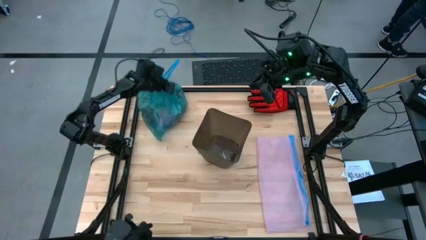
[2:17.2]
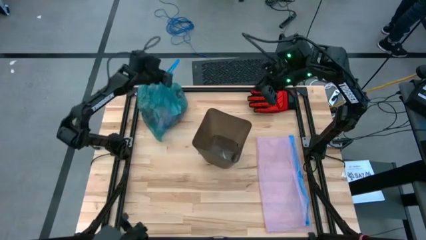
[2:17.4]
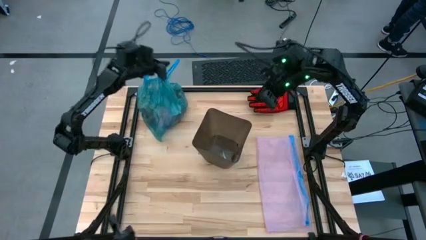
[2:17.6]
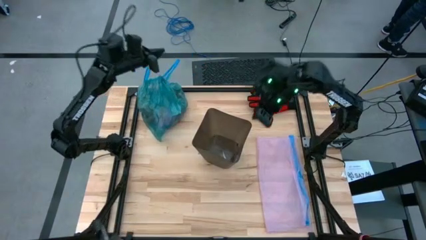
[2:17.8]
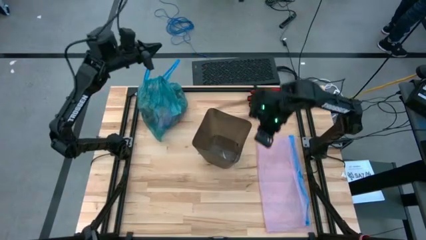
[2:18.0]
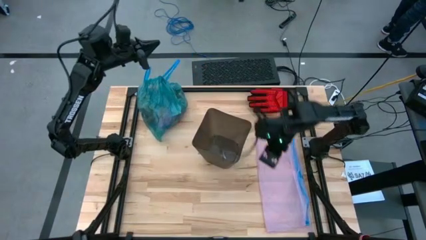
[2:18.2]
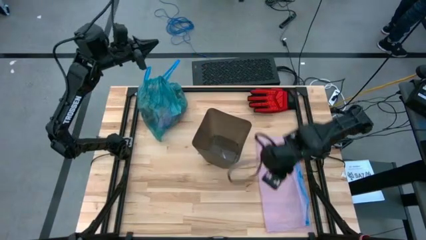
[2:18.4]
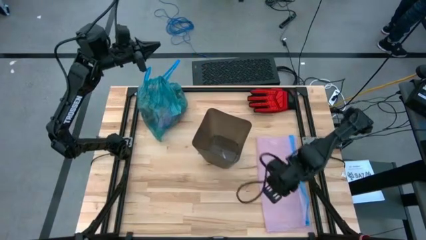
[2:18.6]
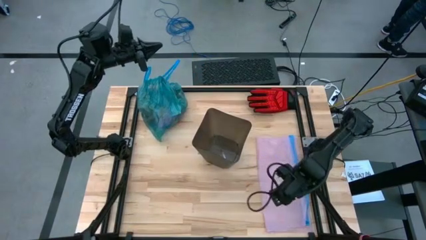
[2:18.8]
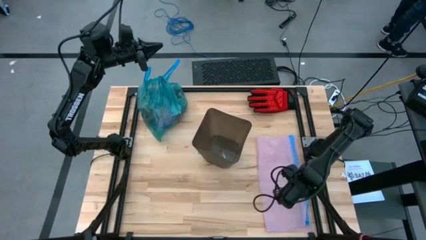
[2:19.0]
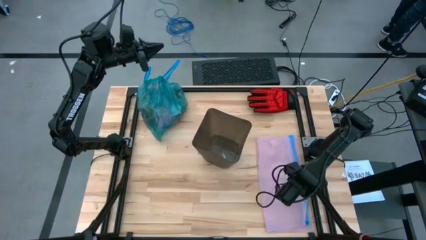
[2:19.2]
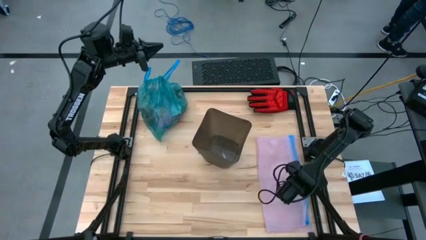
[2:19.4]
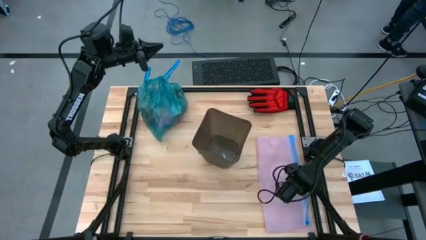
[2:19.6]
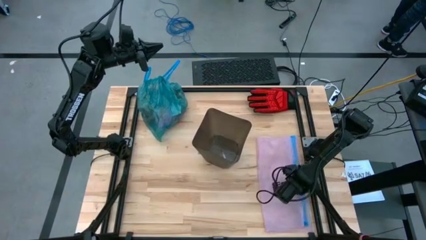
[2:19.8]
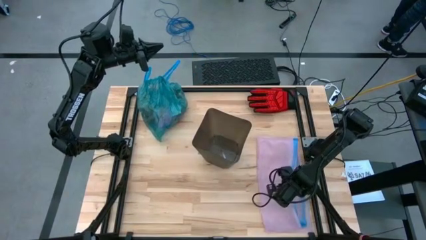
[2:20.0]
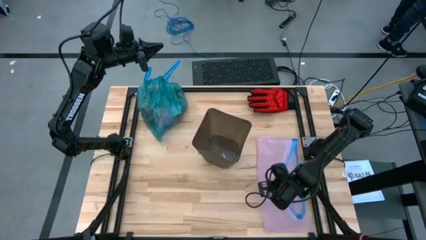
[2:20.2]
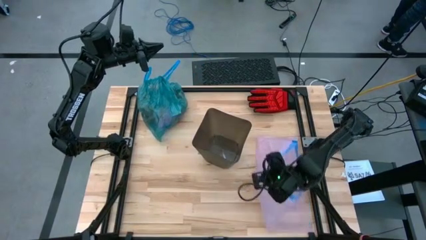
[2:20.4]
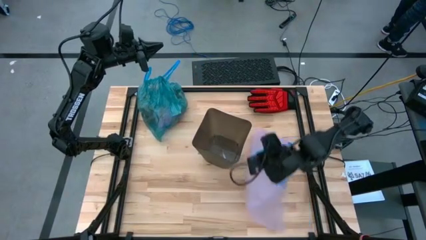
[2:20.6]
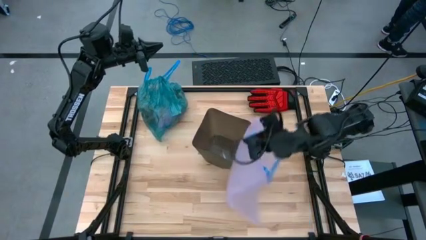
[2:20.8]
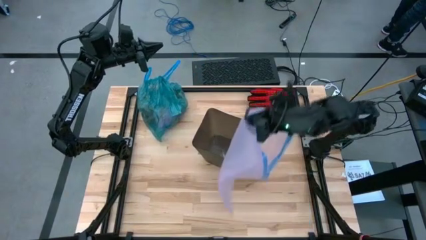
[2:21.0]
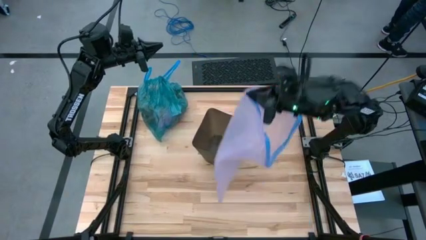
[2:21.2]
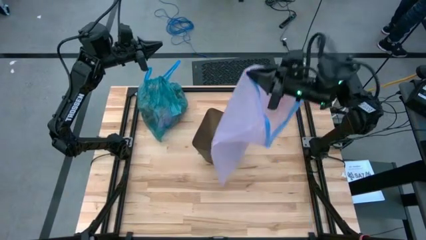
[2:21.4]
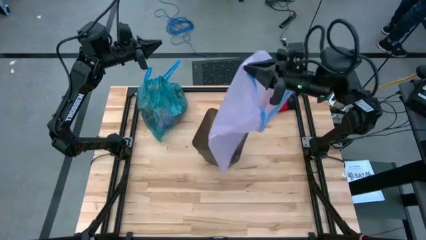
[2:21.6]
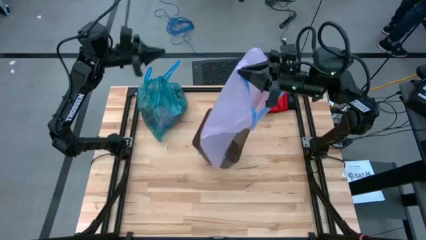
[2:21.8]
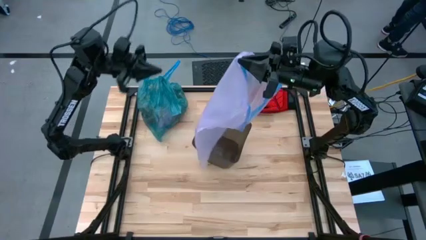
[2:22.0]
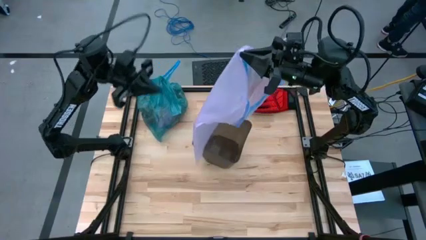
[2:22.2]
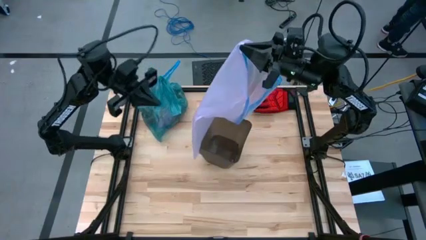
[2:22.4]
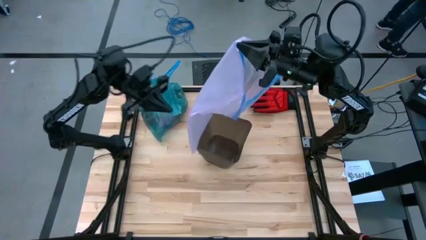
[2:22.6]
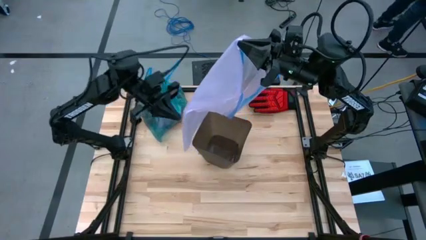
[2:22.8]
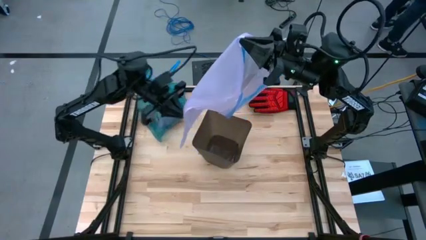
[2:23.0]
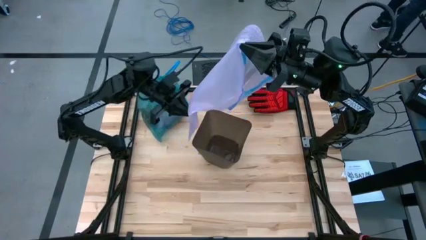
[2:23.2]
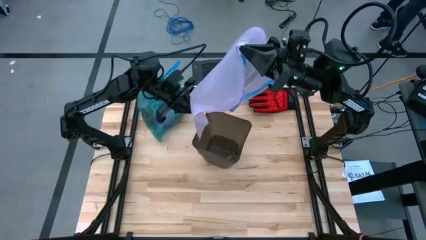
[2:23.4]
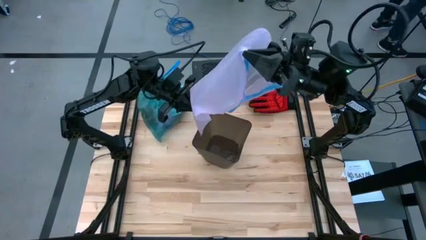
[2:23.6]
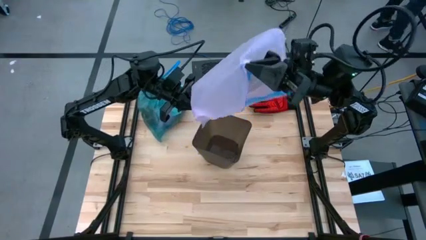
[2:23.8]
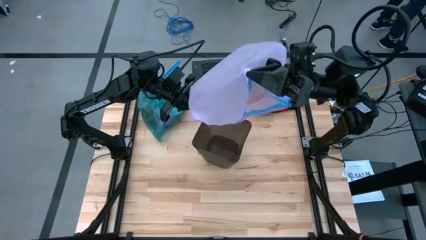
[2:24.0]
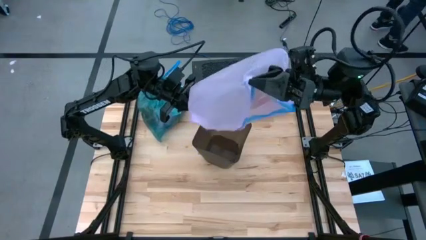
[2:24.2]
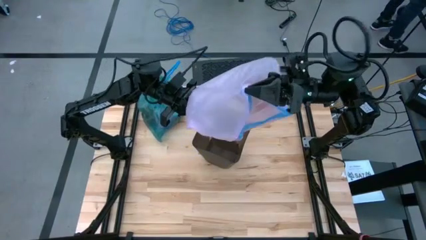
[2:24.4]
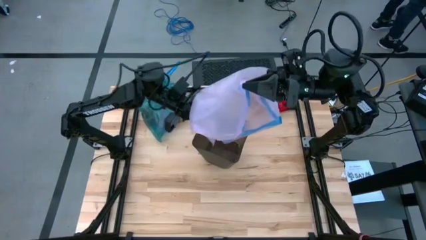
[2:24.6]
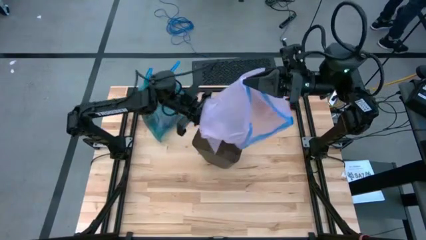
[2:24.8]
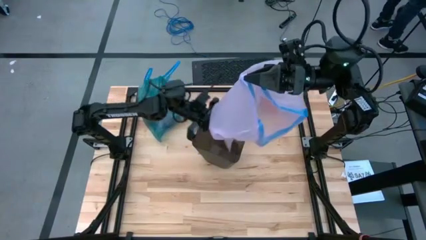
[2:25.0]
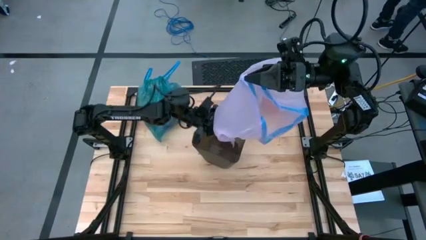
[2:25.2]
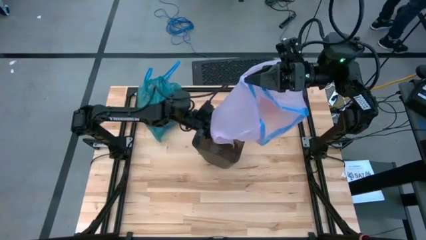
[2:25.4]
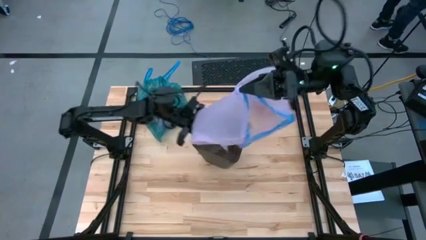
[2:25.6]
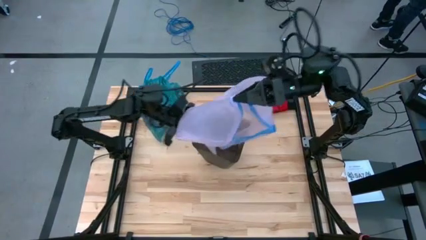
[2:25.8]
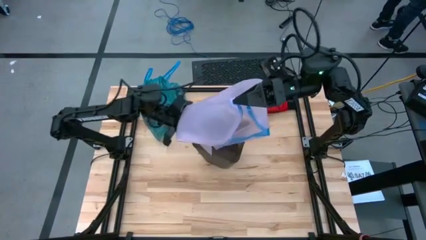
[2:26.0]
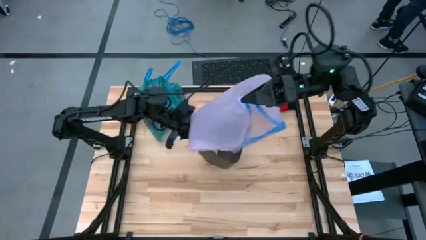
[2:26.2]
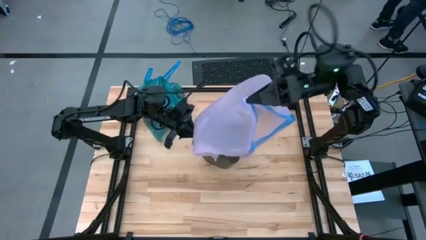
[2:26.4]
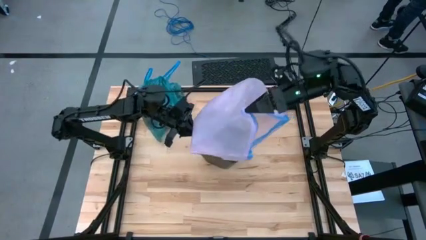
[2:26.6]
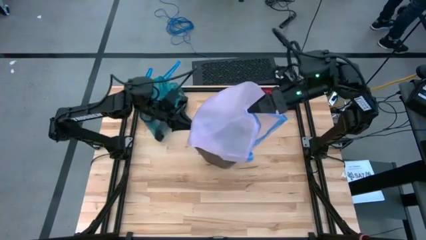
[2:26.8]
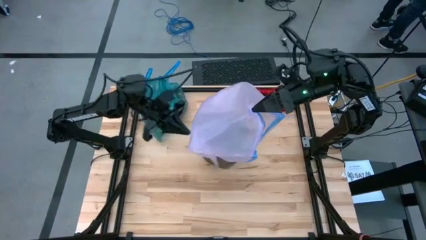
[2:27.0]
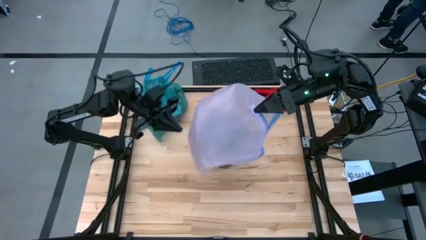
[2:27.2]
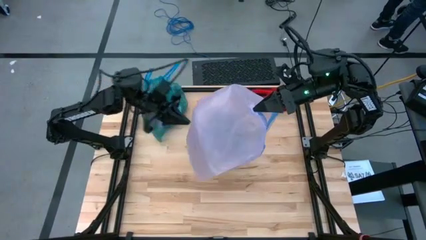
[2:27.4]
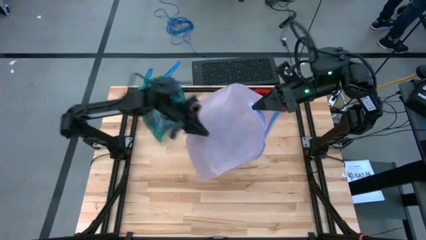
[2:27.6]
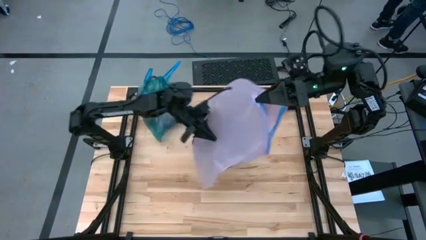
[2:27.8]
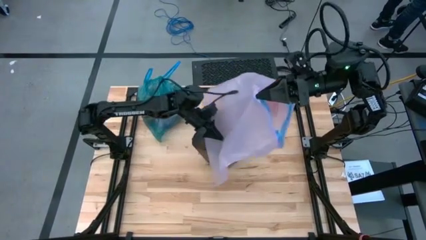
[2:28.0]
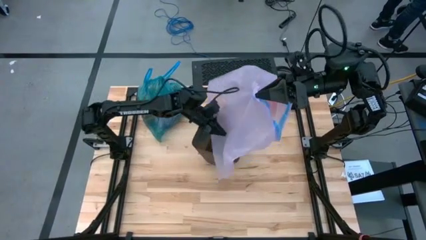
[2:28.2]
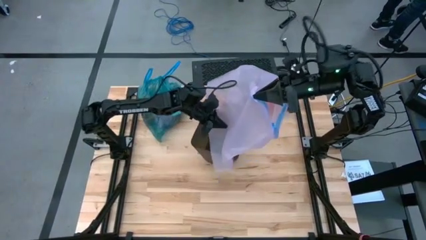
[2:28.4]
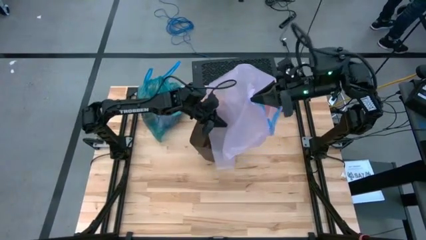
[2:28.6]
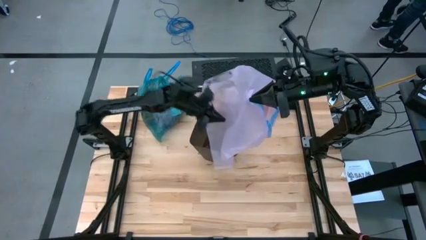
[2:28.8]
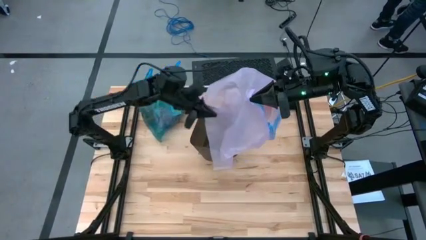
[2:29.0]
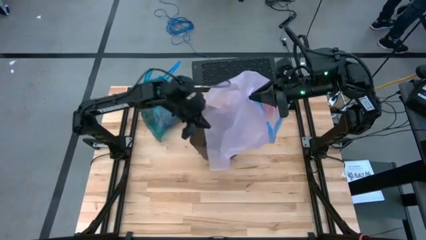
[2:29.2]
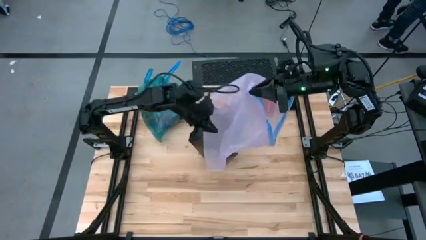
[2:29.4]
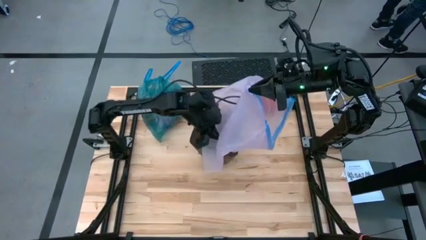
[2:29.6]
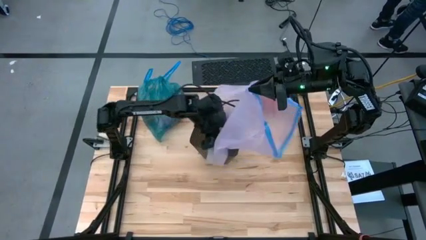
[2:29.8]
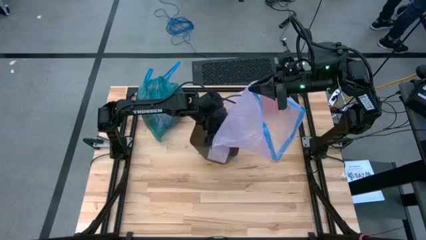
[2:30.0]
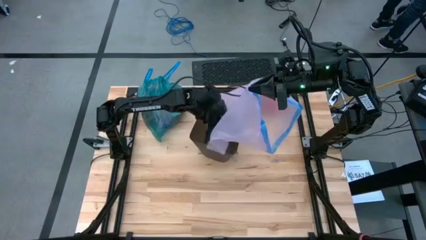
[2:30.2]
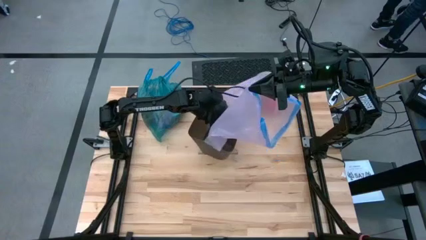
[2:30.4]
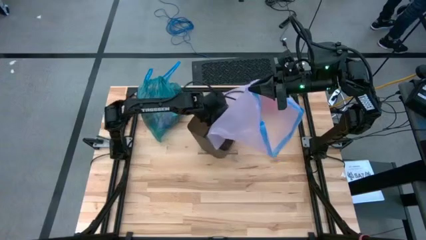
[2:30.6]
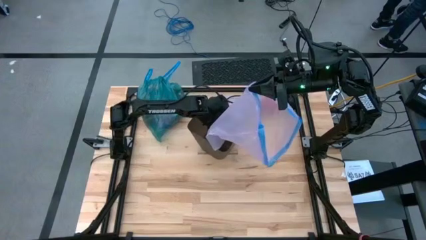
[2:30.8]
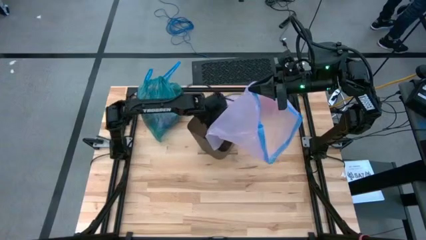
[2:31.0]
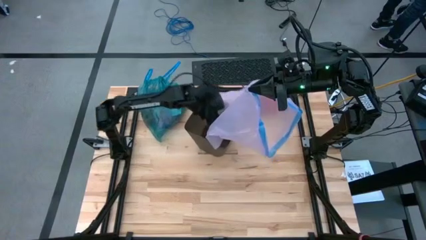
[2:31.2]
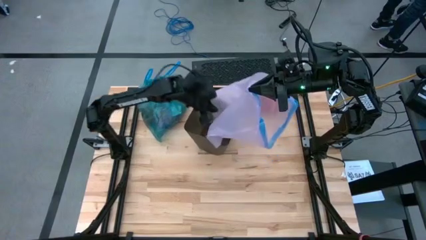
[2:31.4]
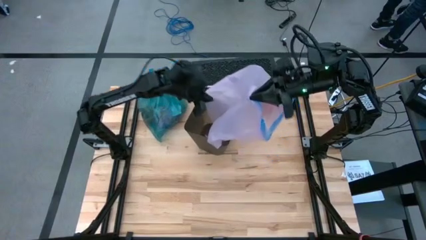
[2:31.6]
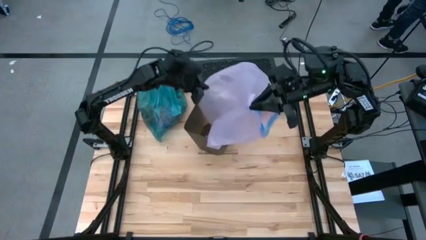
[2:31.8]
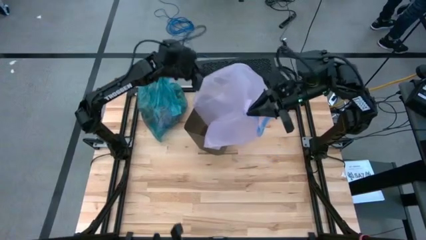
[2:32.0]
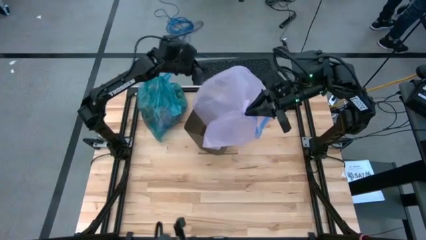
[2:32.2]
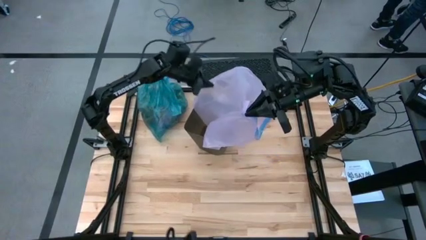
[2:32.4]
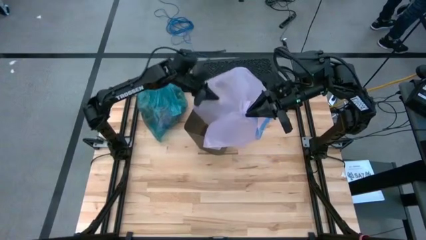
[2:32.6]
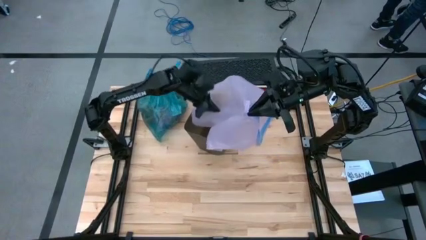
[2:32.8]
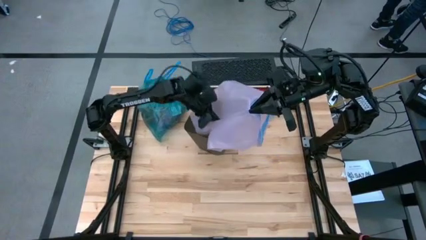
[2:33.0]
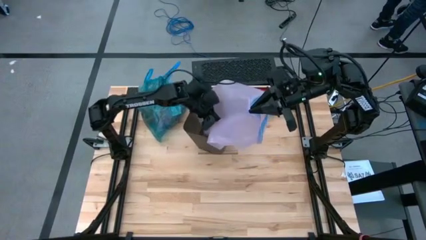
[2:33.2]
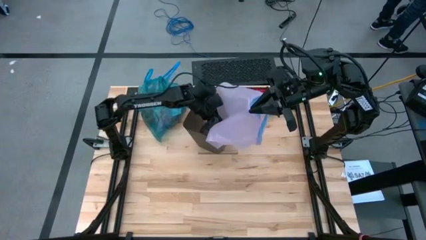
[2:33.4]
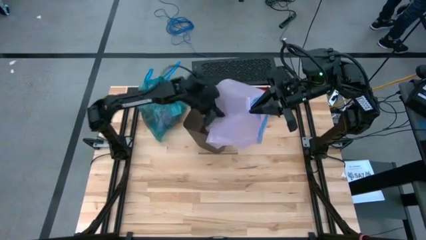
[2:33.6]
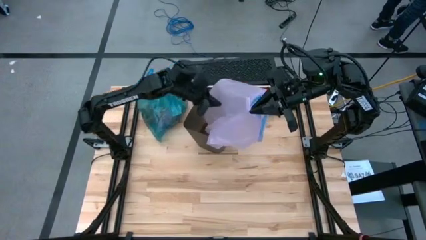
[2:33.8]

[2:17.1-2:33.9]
Task: place trash/remove bag and relplace
Insert the new pink trash bag into the trash bin
